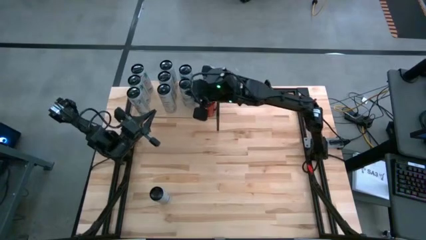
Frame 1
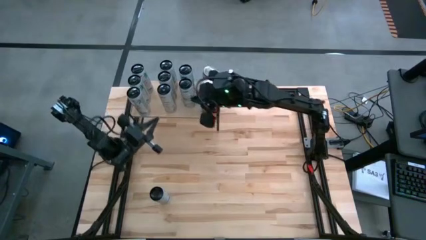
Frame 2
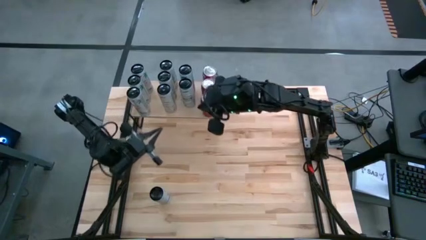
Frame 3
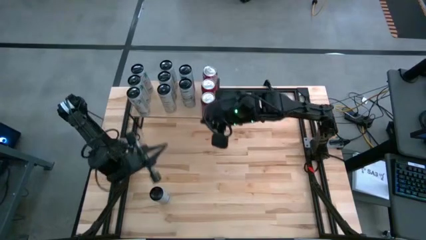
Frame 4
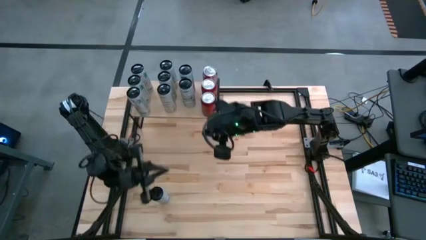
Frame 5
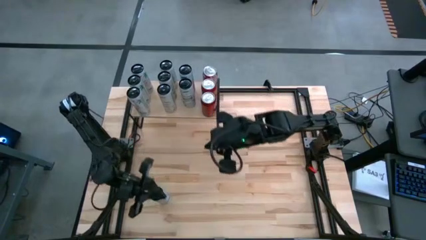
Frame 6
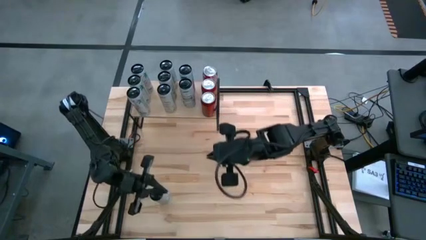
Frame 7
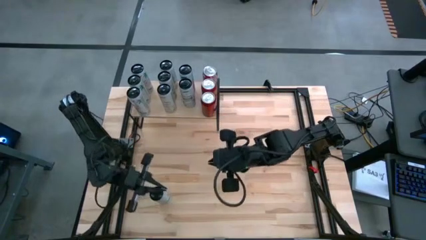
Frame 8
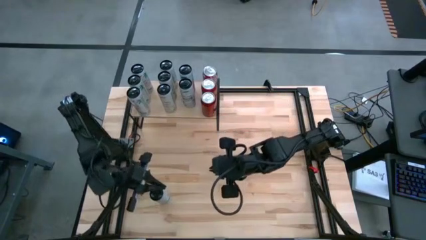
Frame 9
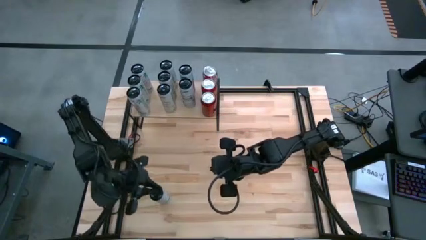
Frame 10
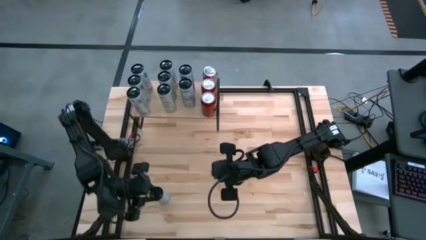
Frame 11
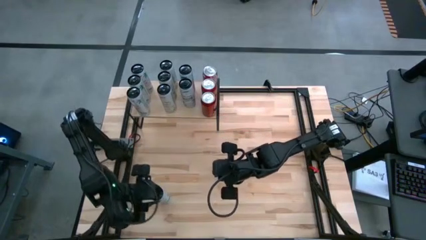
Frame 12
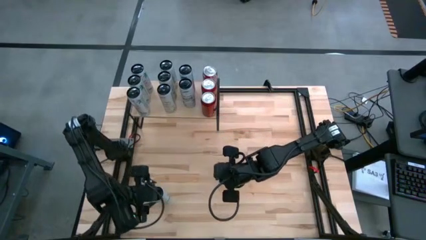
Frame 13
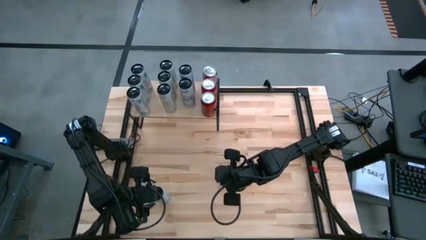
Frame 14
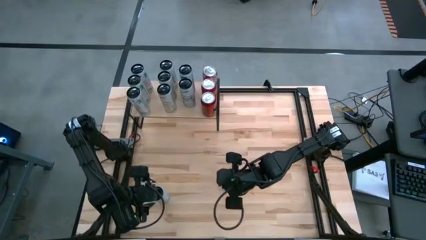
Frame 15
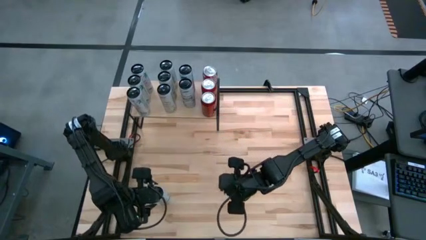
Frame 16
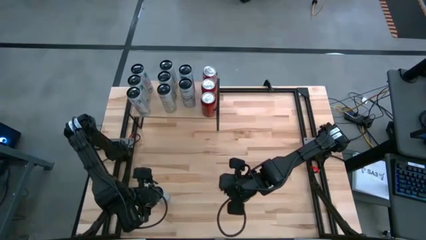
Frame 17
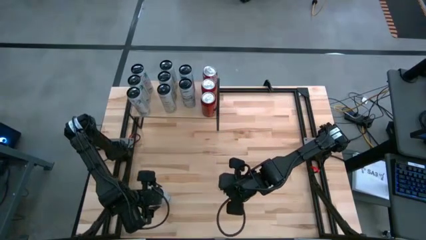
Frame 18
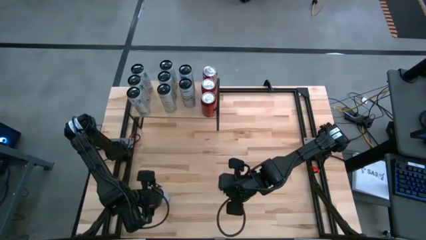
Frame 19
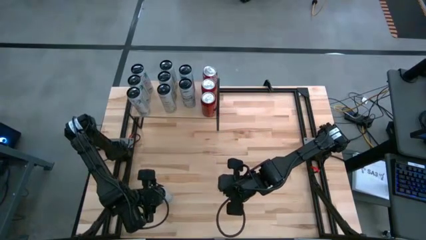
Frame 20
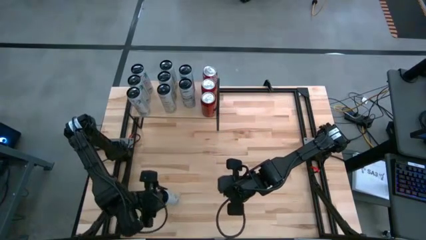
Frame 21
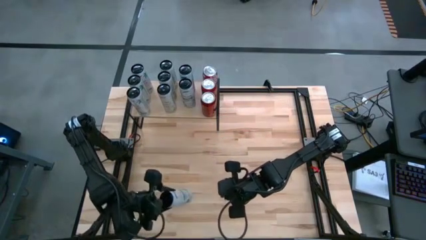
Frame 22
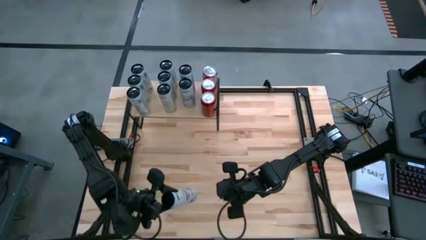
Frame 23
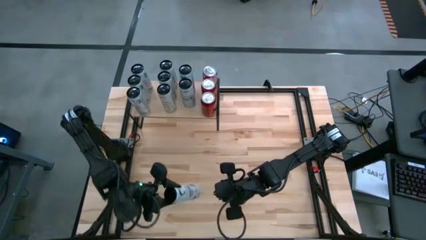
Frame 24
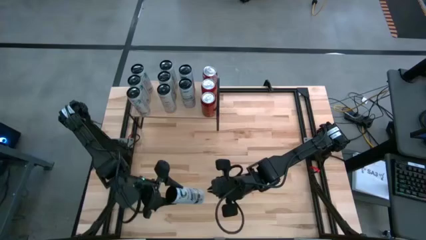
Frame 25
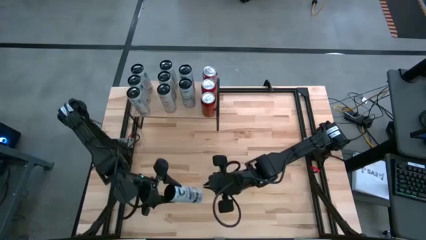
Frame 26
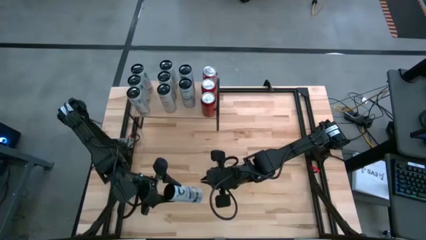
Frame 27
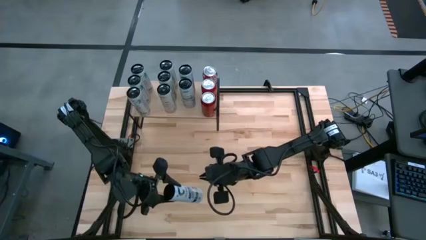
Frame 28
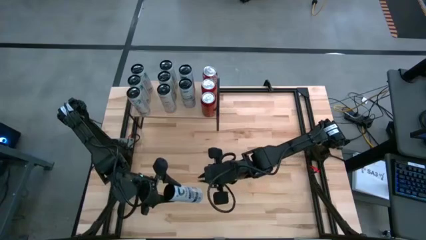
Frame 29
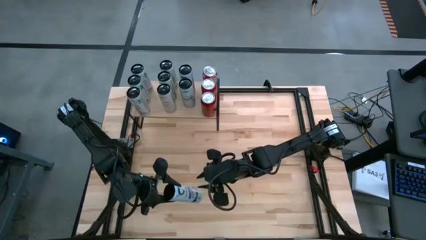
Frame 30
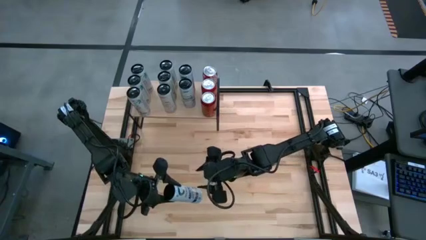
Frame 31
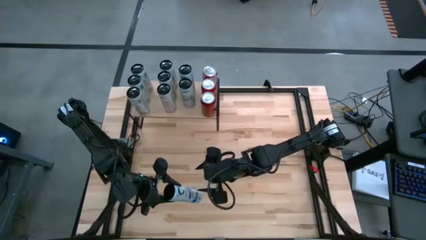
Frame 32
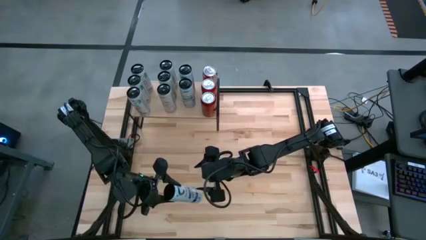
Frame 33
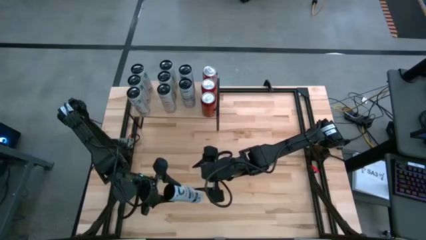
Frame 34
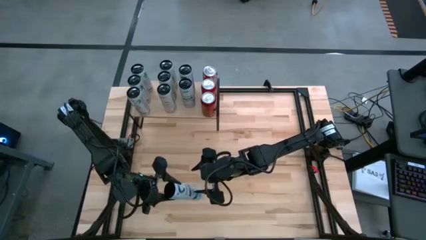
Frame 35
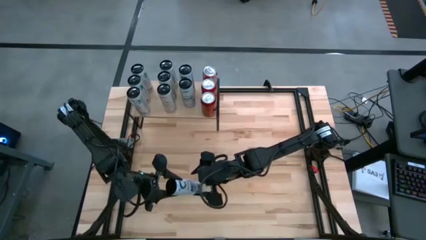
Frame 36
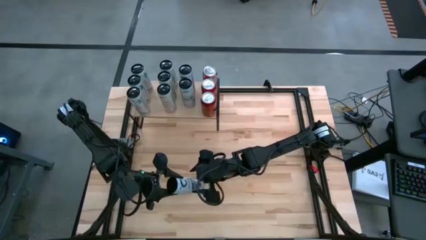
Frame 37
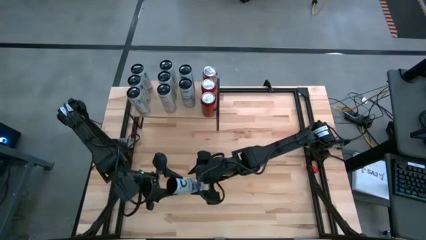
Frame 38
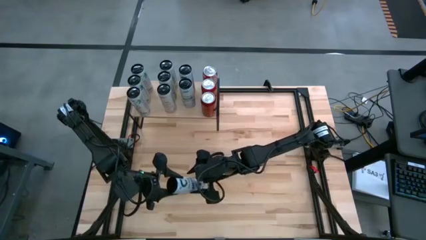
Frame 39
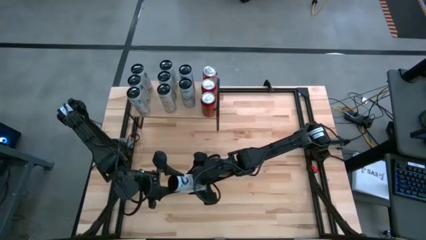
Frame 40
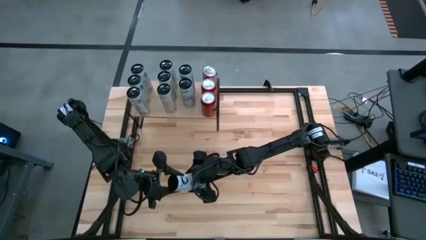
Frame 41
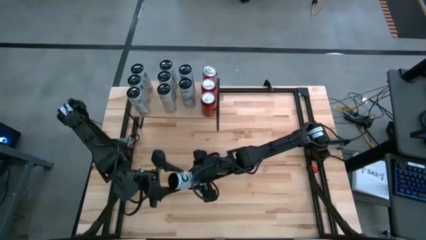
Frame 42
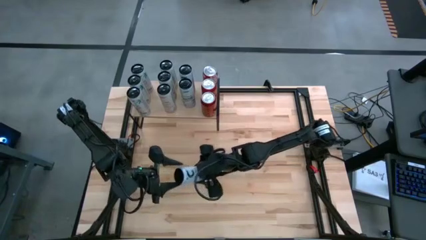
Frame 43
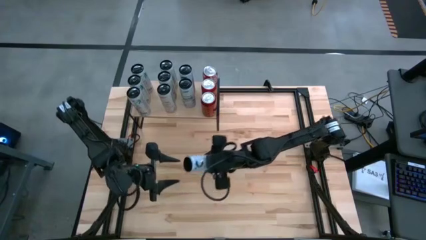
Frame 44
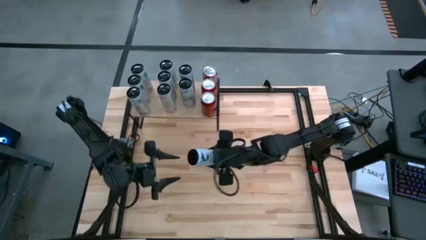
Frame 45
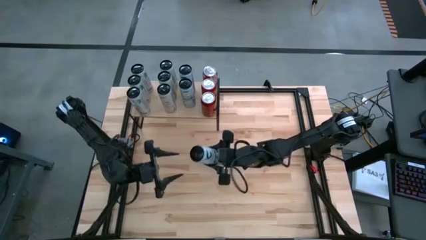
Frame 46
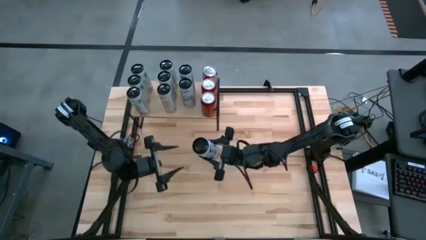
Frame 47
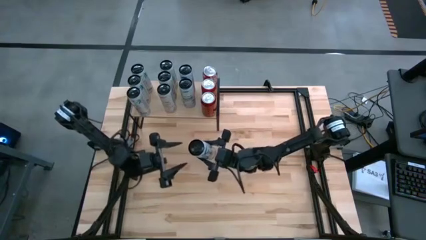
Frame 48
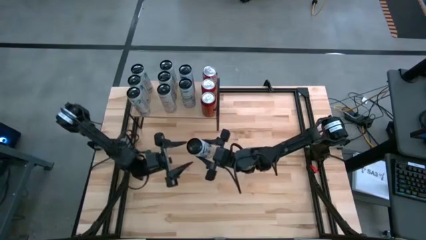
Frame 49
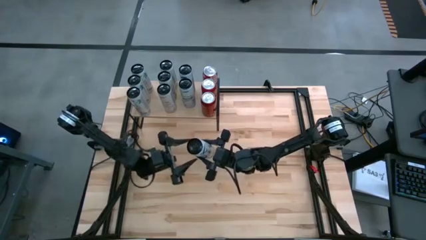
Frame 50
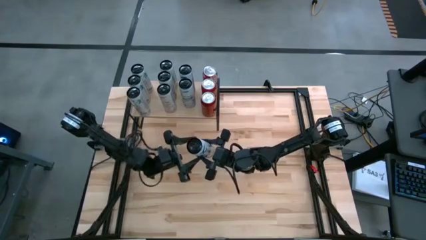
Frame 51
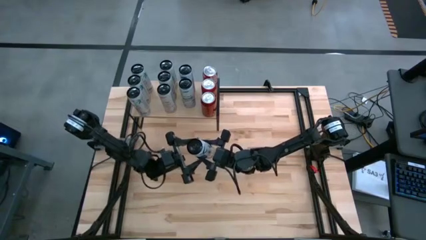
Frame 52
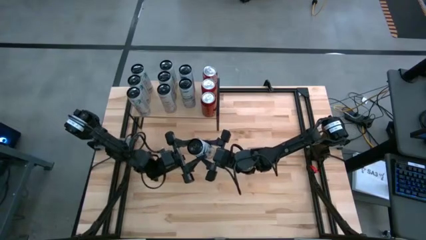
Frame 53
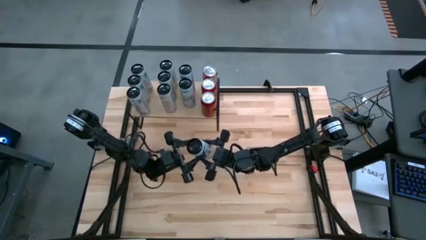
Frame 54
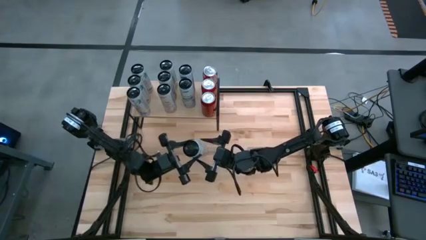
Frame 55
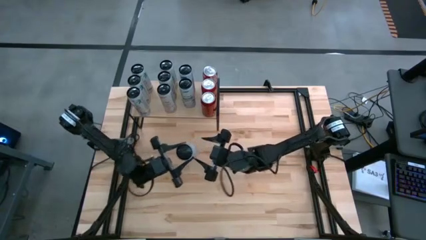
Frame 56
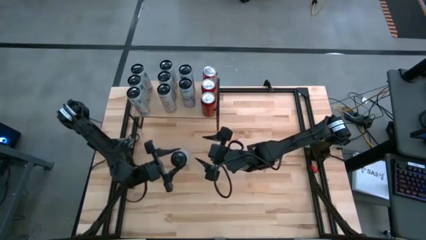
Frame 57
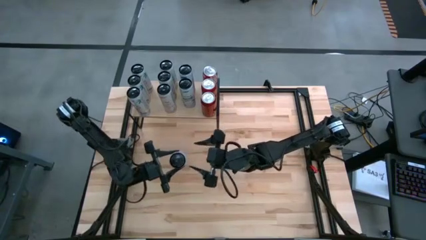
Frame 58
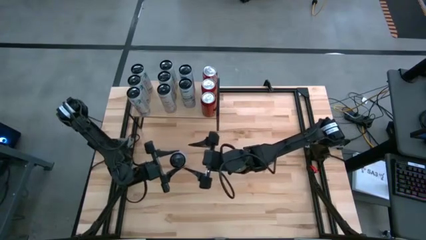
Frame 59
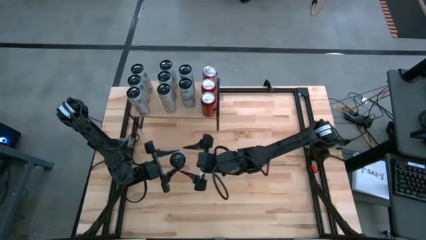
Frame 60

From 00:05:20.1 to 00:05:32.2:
Task: Place canned beverage on shelf
Put the white blue soda can on the shelf aligned with the other white blue soda can

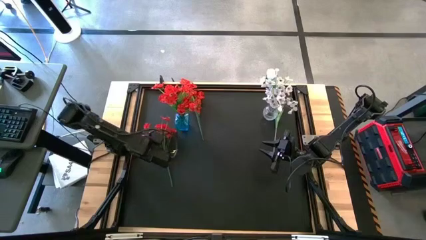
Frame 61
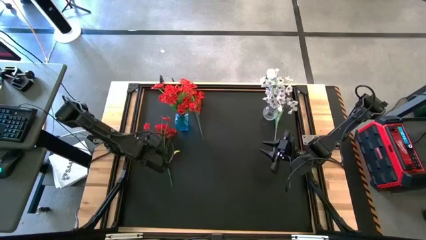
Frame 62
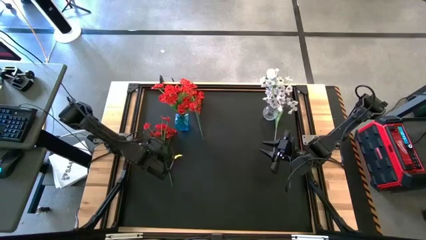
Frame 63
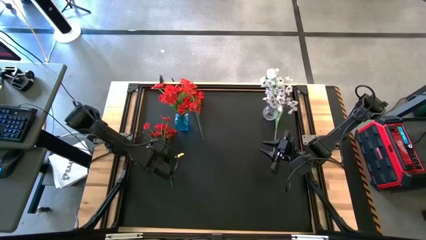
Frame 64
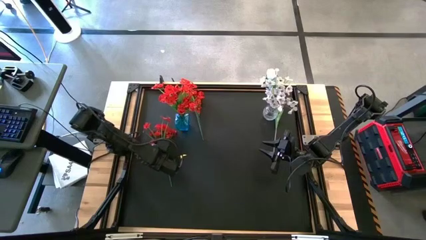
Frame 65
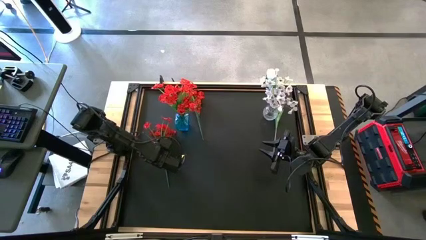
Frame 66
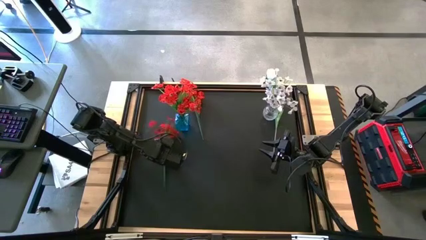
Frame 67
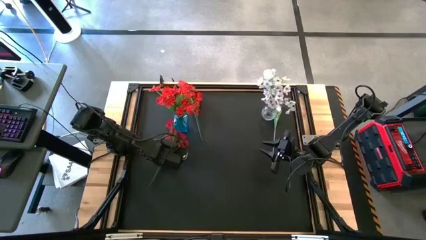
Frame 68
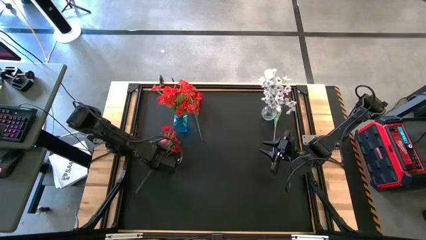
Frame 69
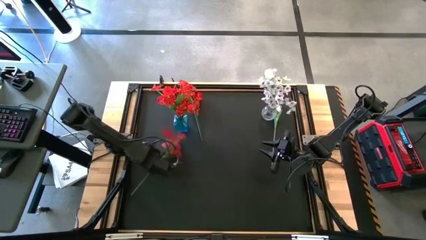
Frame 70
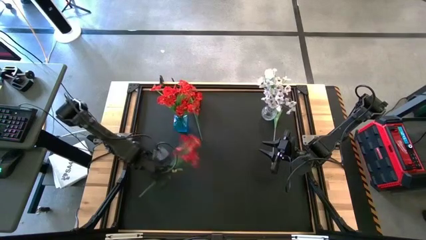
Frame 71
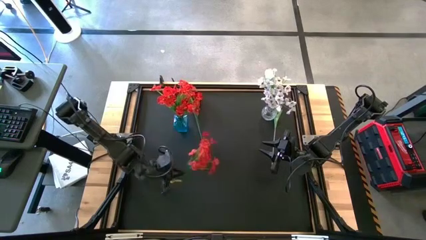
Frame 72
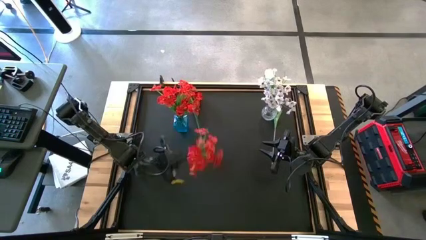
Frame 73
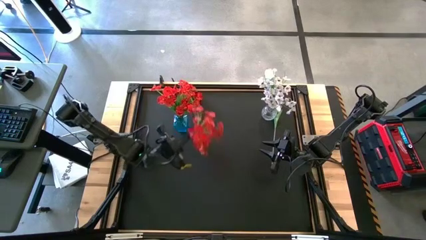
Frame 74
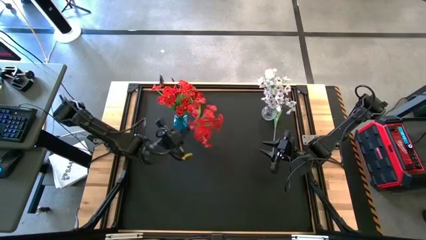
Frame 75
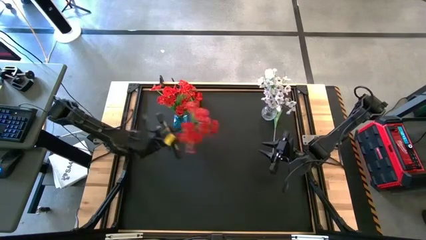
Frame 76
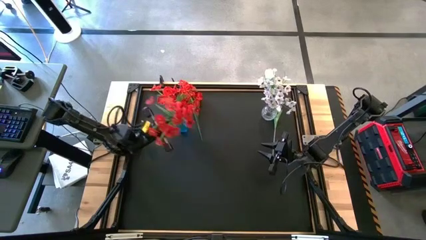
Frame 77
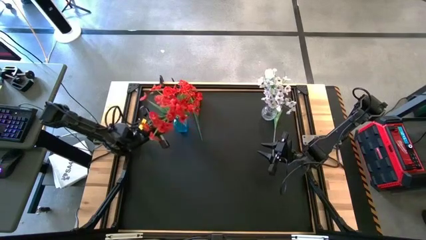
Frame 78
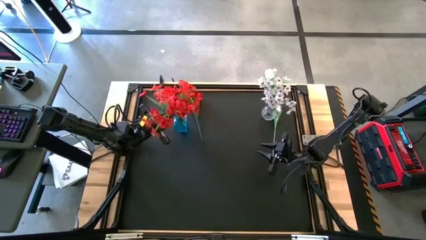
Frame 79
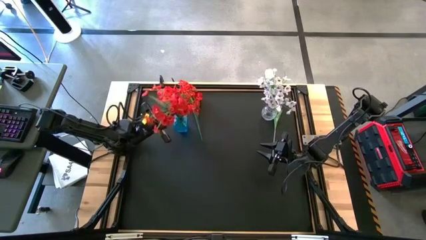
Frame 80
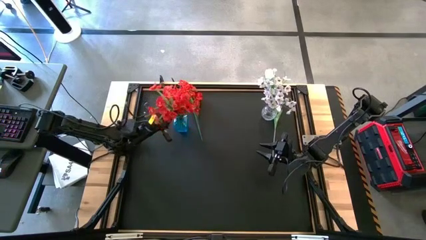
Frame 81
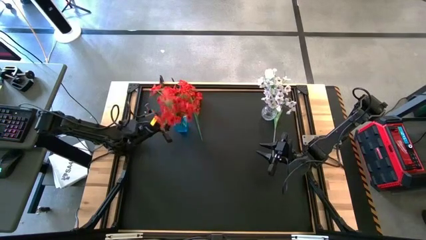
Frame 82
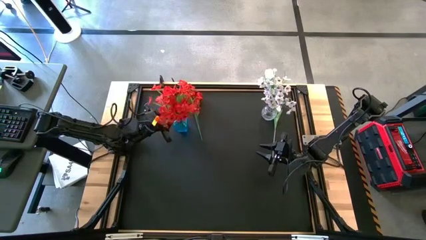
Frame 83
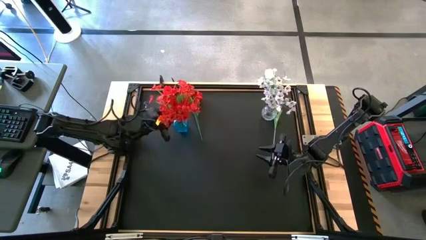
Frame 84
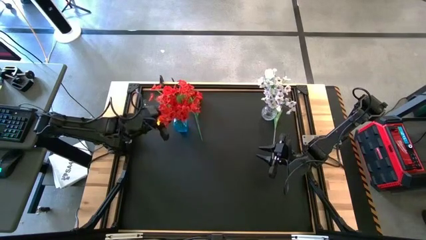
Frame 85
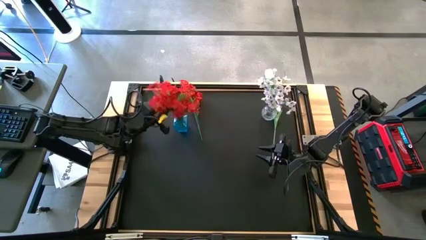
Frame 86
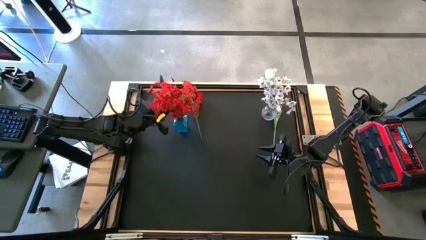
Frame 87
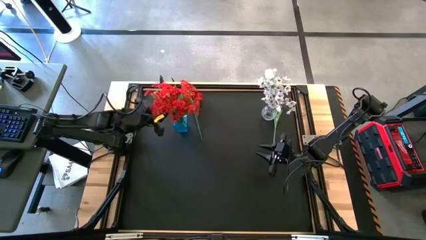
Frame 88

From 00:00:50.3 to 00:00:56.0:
Task: Sort flowers into vase by color
Put the bottom red flowers into the blue vase
